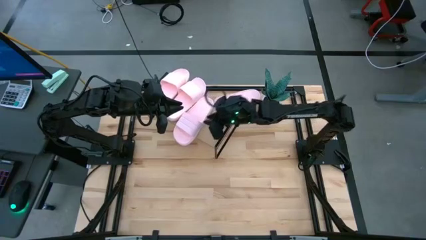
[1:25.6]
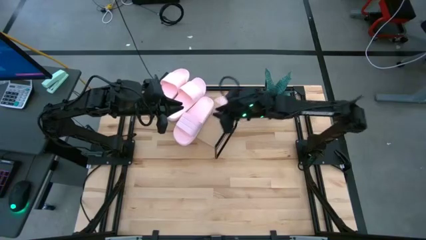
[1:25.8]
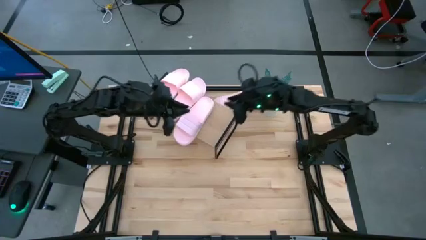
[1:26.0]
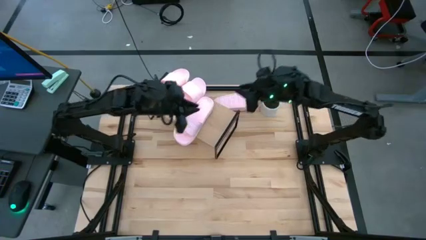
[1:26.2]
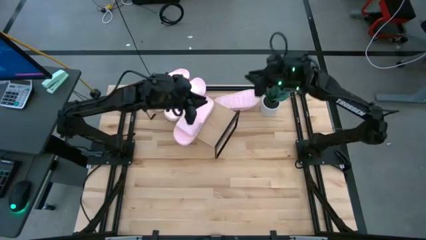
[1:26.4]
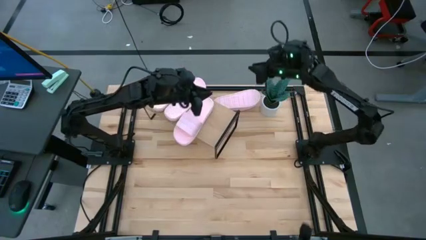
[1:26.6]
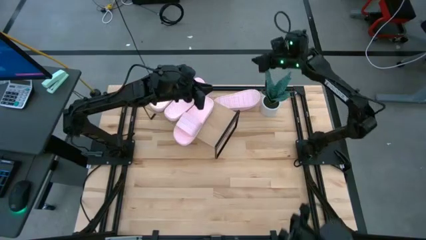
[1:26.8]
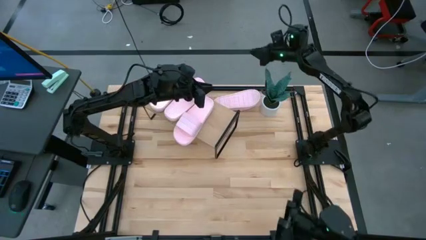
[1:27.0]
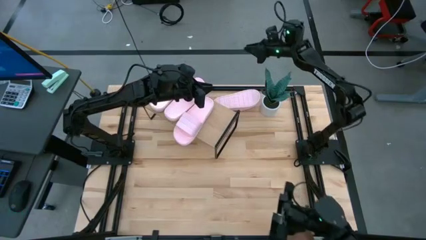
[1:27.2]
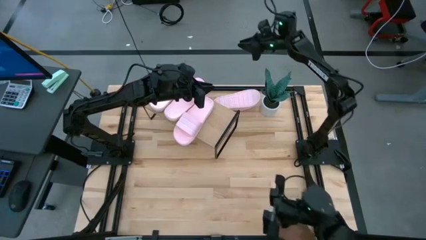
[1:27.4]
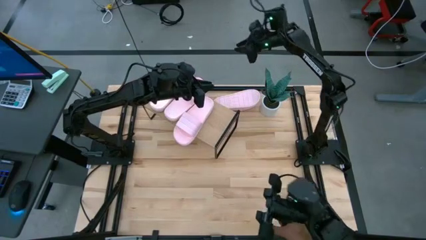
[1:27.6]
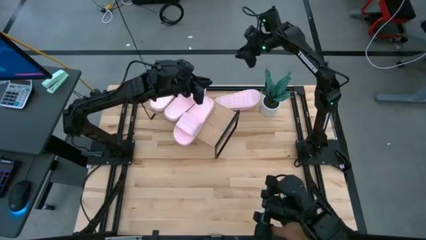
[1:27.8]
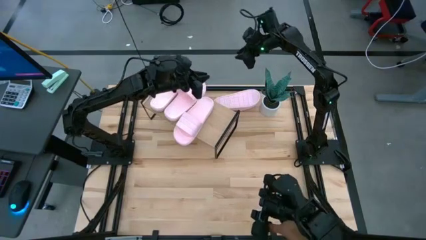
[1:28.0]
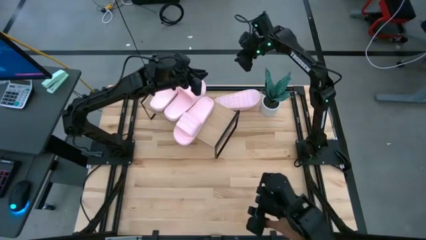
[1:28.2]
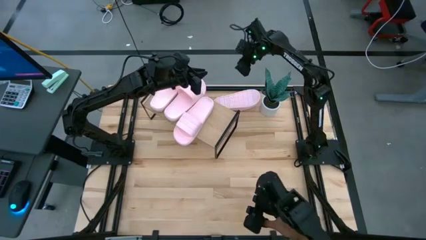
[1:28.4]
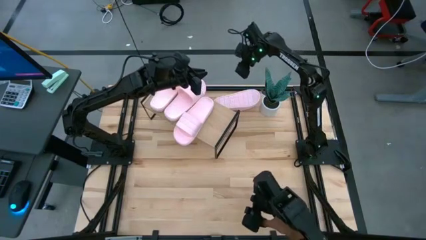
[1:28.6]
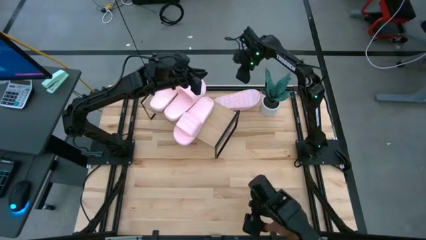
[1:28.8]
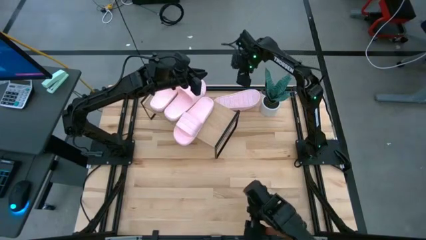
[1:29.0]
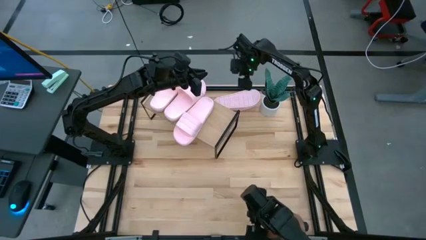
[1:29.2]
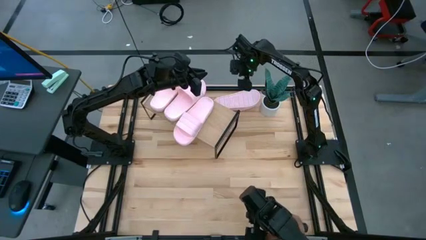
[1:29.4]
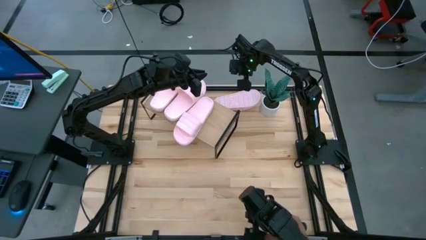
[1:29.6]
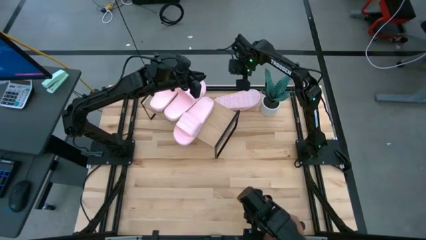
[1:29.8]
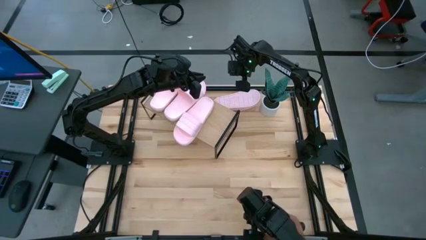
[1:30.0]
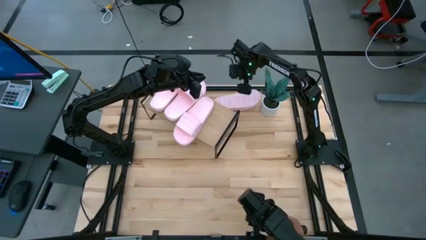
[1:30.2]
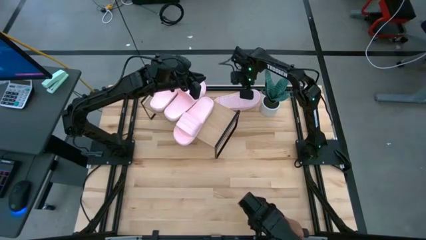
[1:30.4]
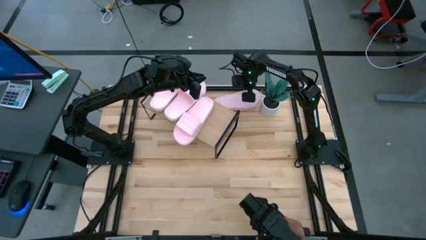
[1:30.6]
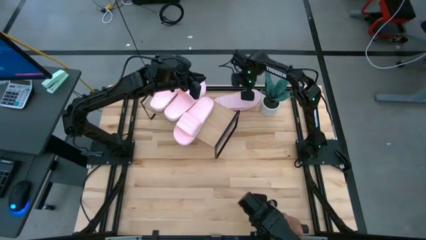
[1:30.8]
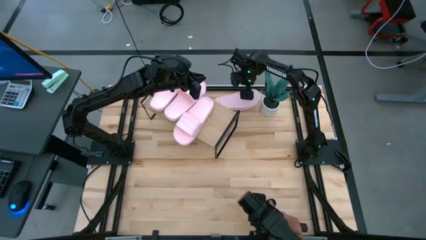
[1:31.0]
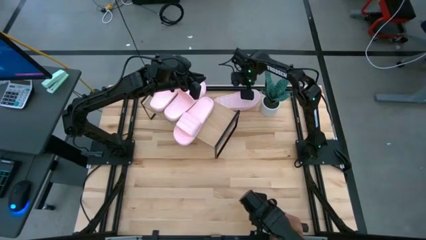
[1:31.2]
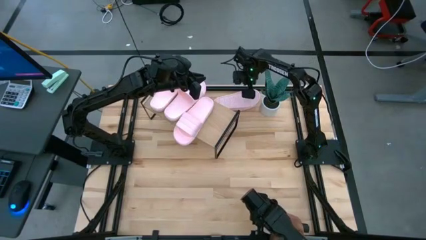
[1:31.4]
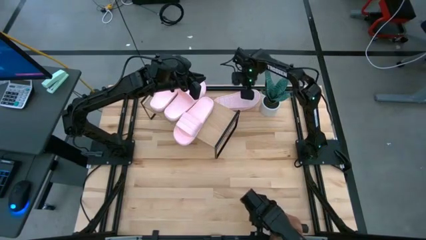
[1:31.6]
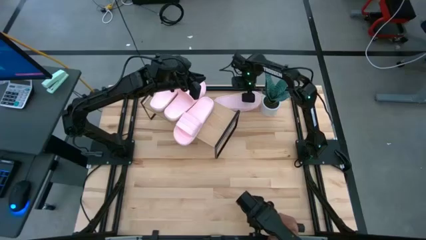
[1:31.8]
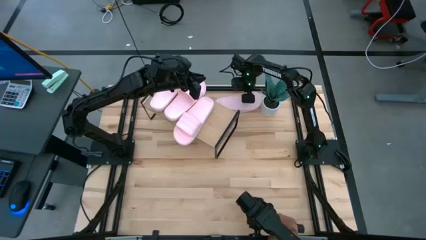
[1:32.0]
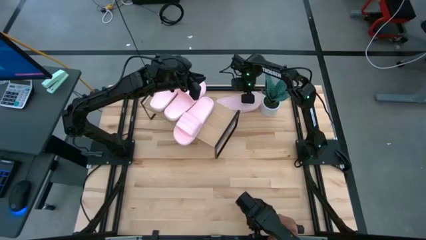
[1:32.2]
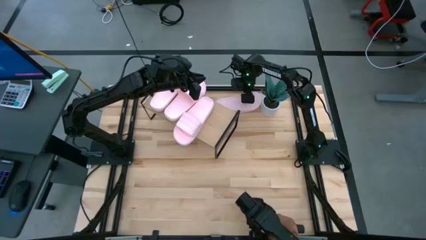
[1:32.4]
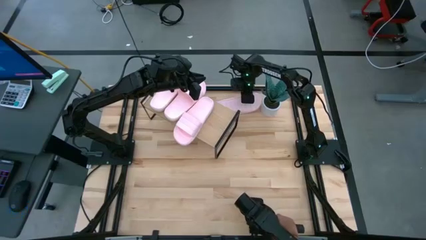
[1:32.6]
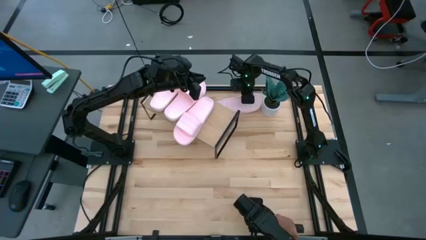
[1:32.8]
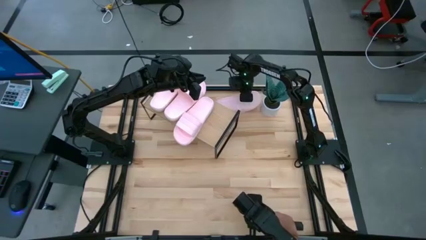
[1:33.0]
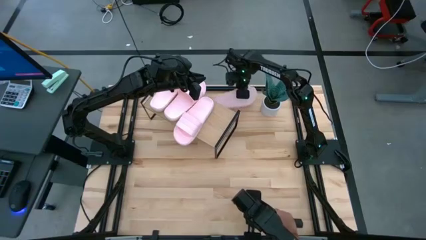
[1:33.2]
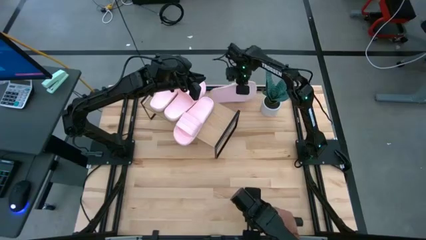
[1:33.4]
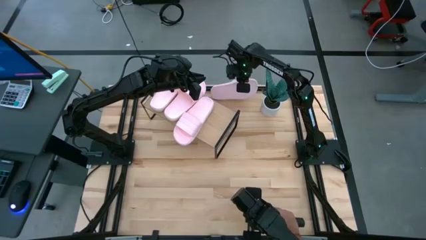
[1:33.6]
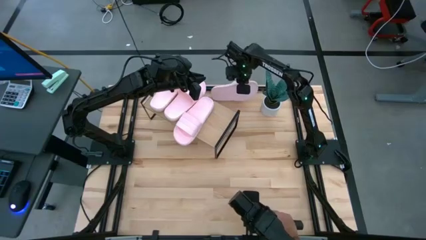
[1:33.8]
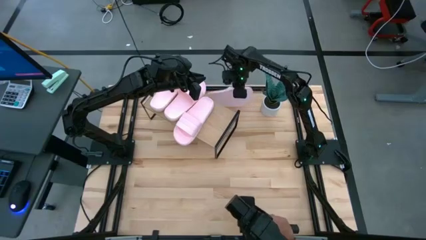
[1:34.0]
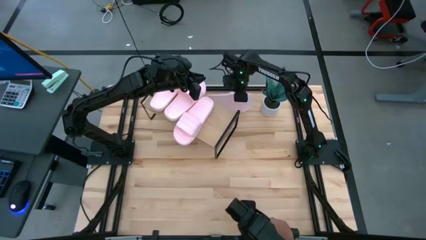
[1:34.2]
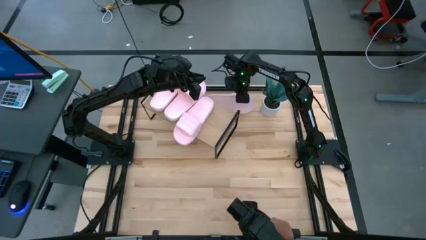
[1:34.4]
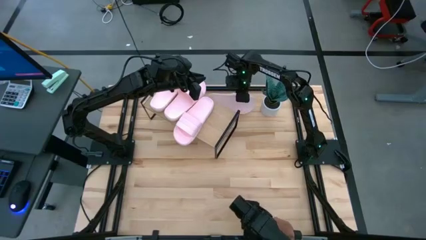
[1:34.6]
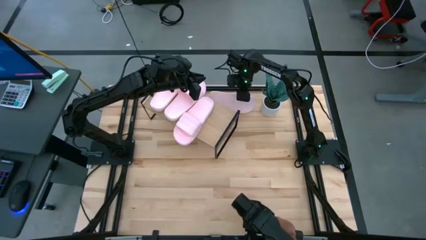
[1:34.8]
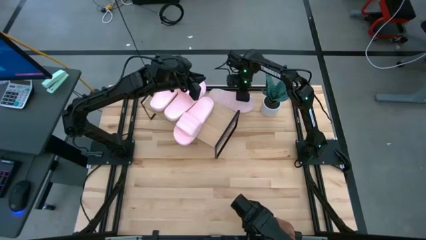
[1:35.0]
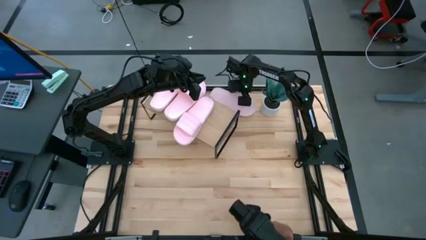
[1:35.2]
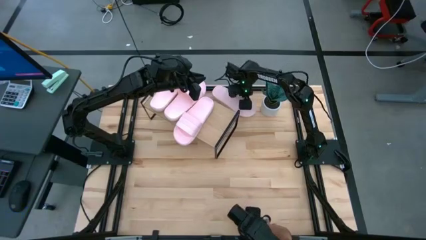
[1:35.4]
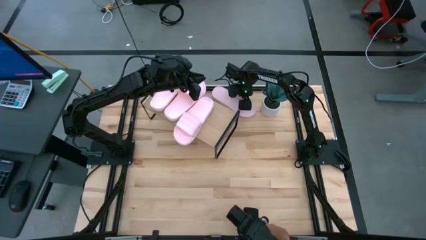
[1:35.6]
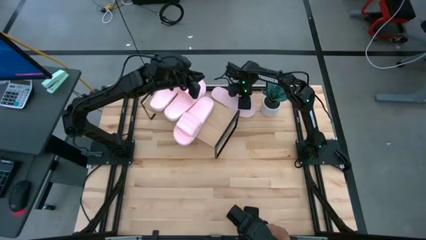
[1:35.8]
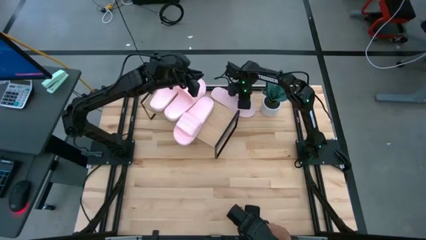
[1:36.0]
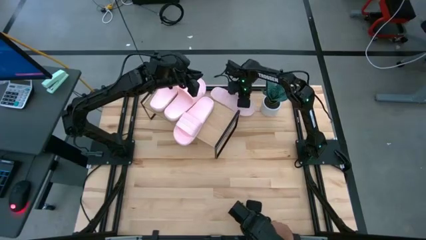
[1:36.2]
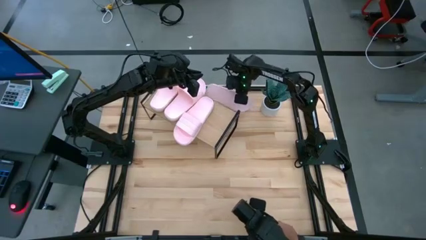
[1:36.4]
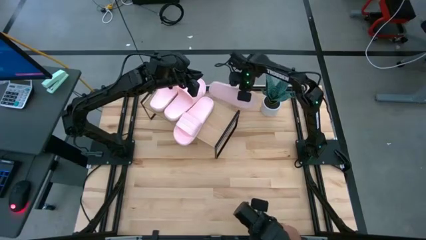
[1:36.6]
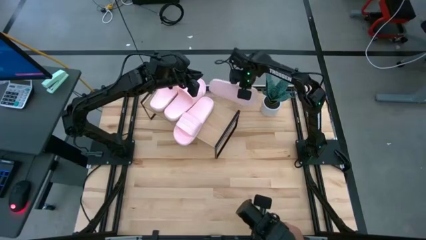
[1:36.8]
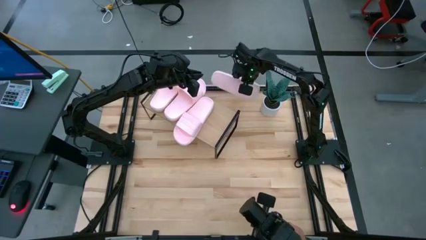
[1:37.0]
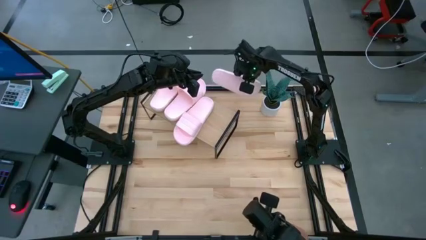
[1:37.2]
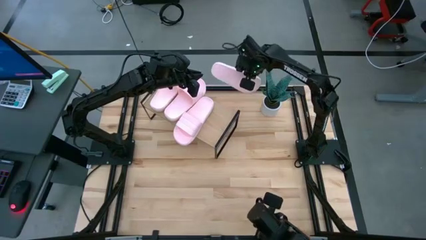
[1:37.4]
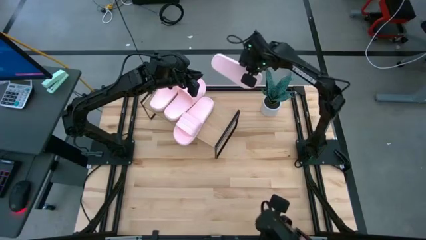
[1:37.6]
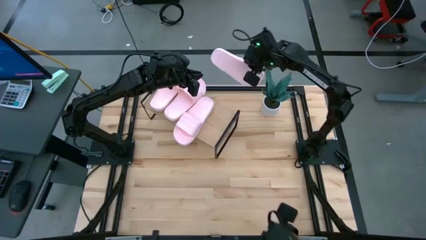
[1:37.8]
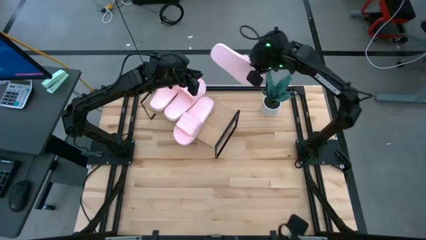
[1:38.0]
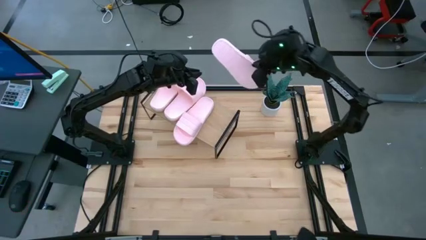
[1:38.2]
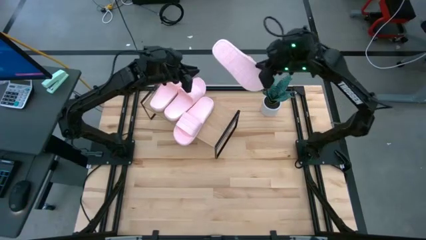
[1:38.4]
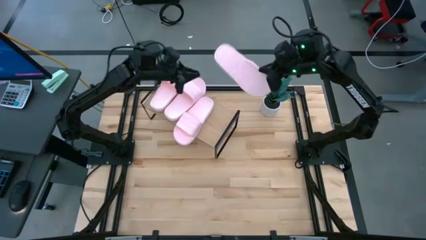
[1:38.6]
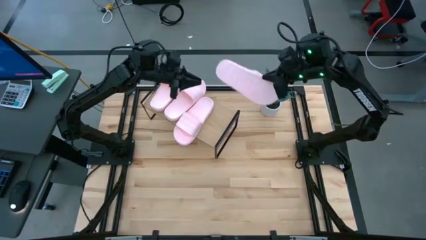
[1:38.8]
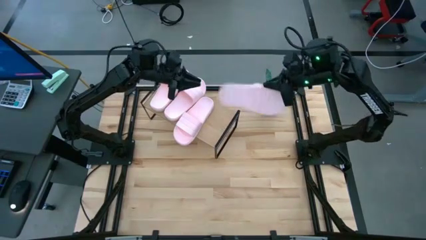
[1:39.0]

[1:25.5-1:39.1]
Task: Pick and place slides into the shelf
Put the pink slipper on the shelf
